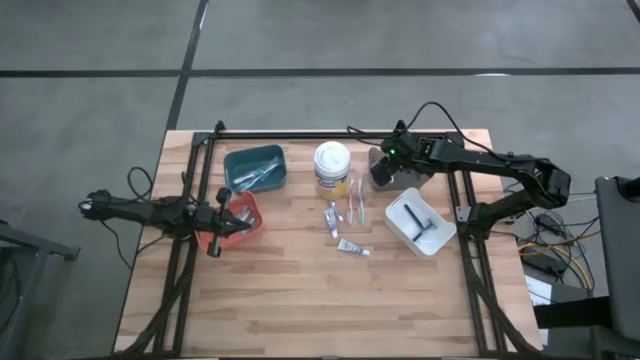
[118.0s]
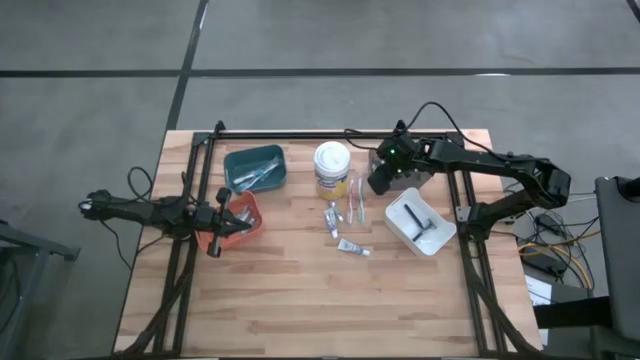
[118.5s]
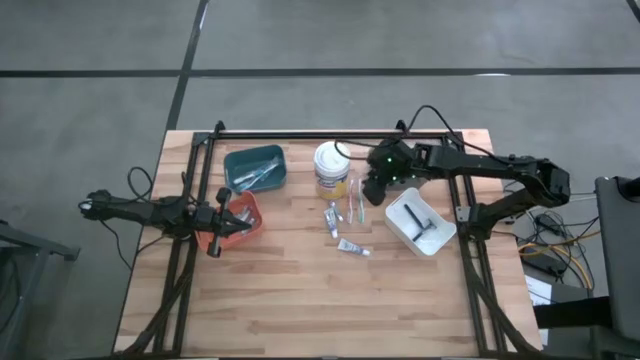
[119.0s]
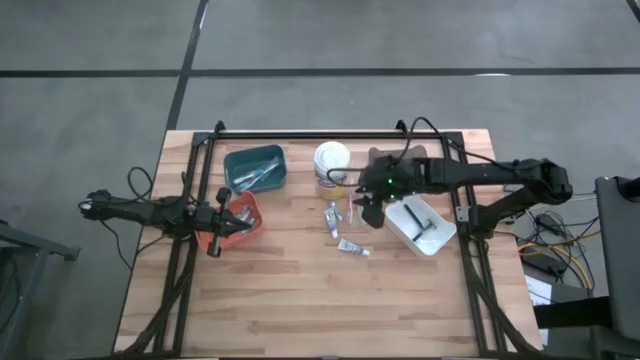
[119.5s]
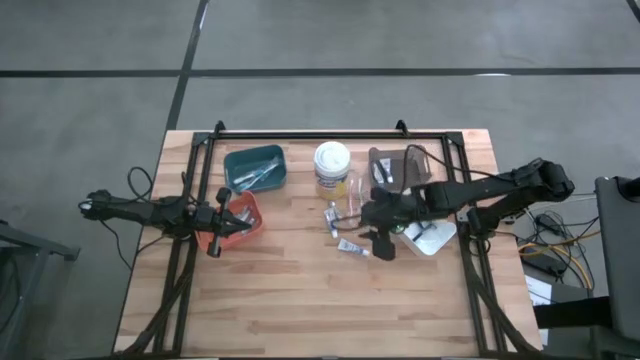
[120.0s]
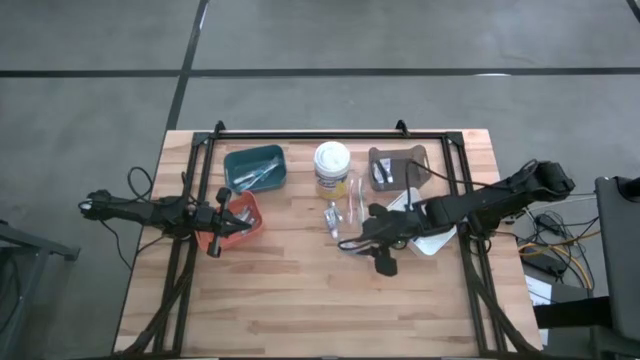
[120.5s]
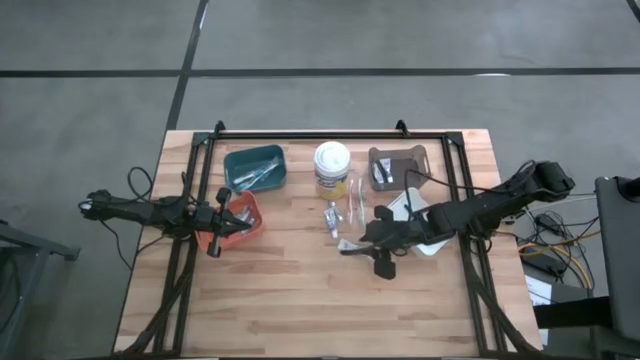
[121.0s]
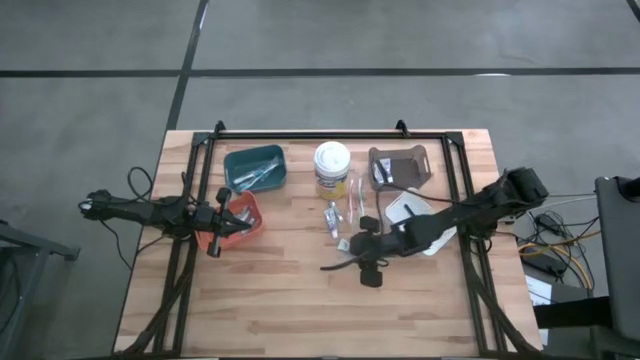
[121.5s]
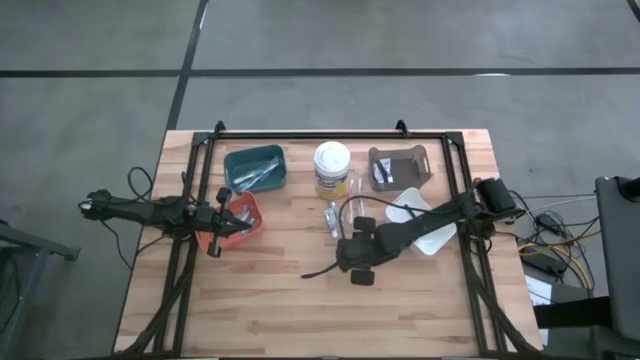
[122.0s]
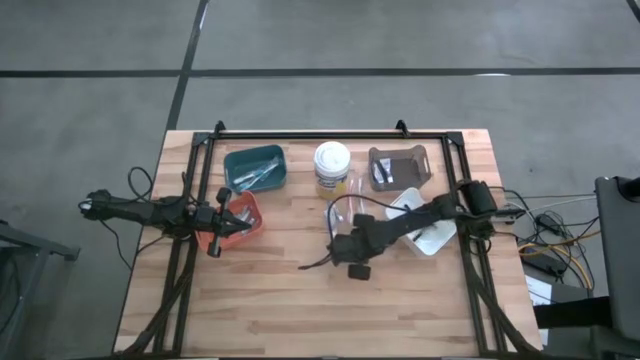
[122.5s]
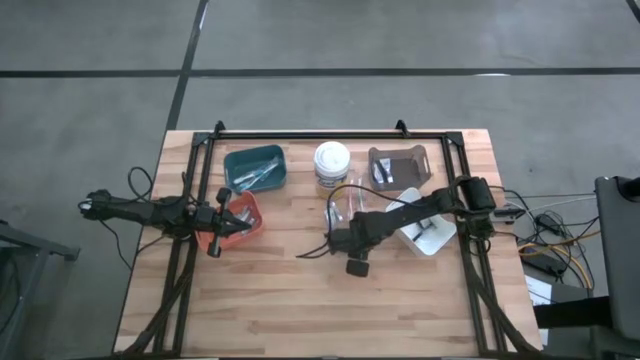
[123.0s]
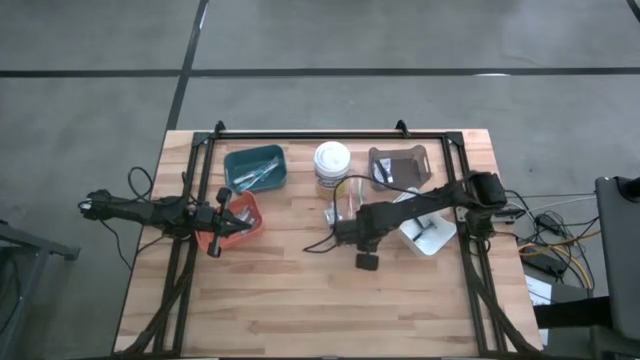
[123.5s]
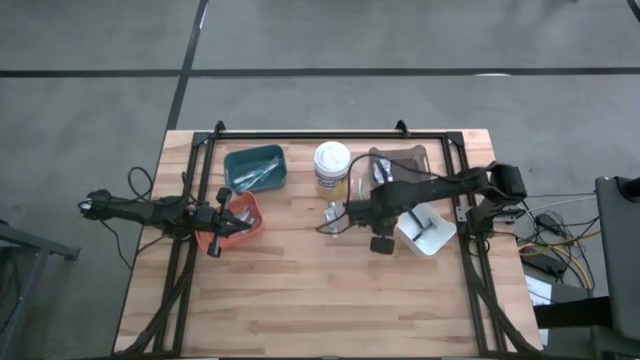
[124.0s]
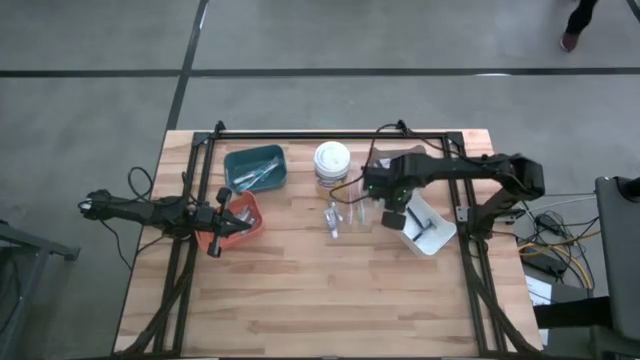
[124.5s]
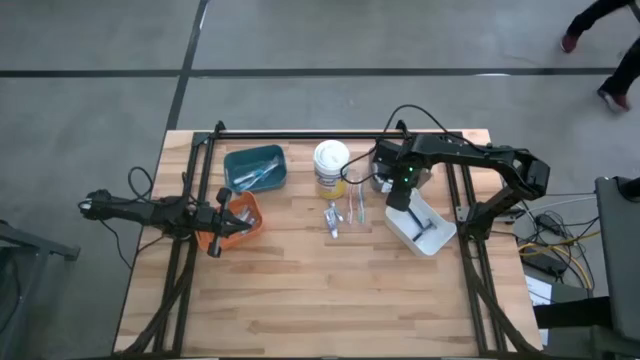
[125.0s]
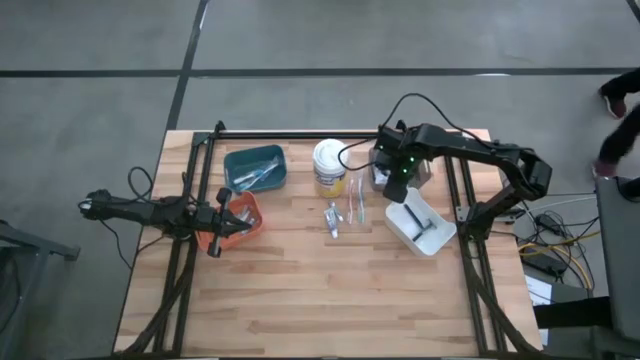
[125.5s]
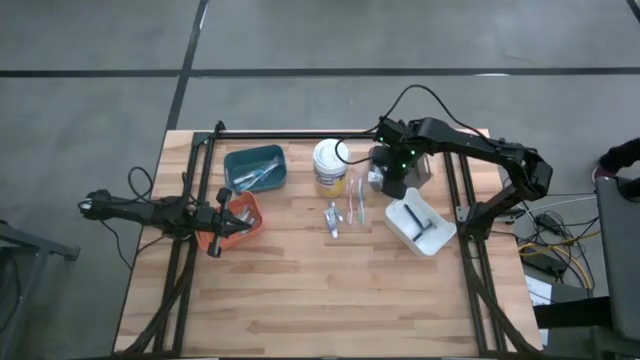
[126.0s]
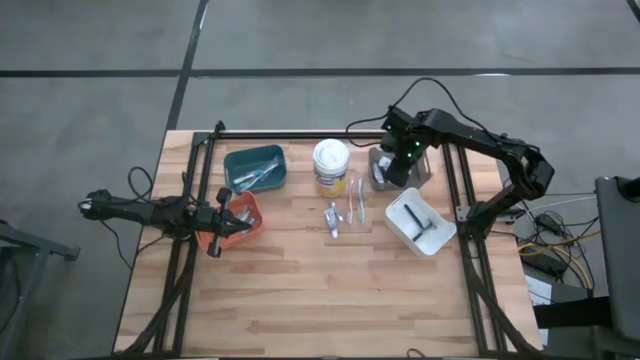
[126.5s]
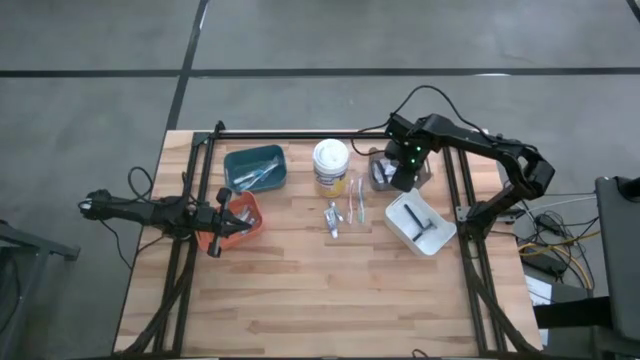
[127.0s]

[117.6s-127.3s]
Task: Pick & Place Travel size toiletries
Put the bottom toothpaste into the black bin

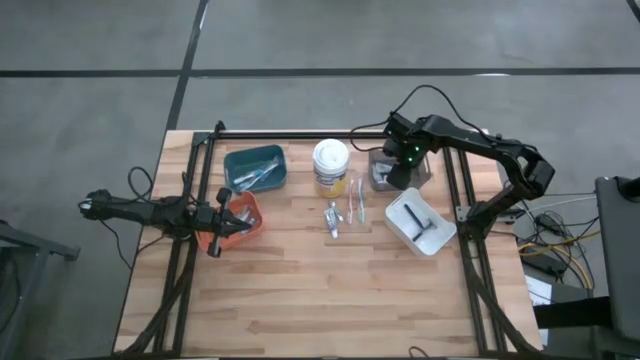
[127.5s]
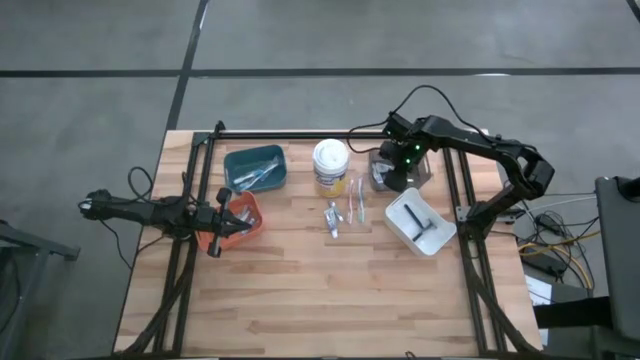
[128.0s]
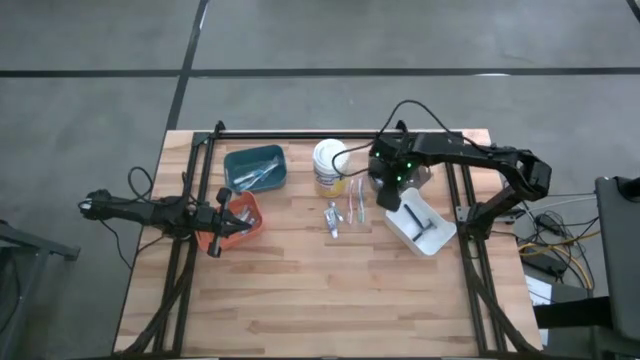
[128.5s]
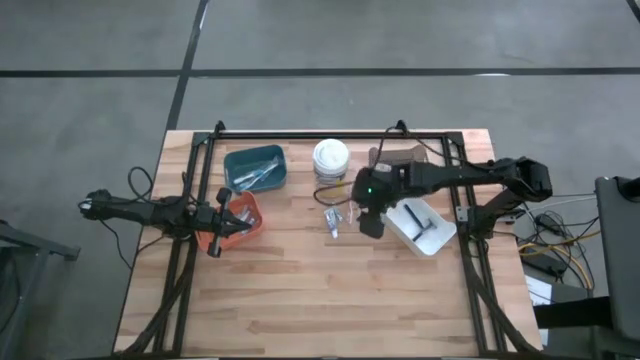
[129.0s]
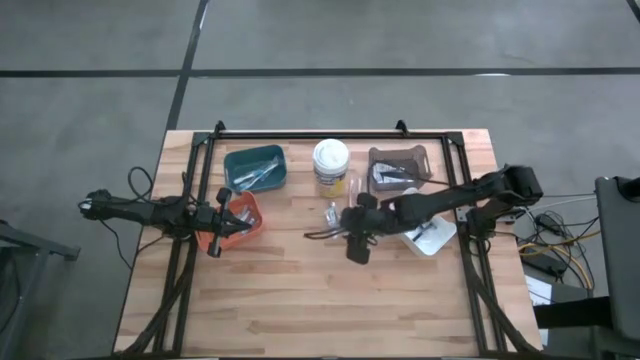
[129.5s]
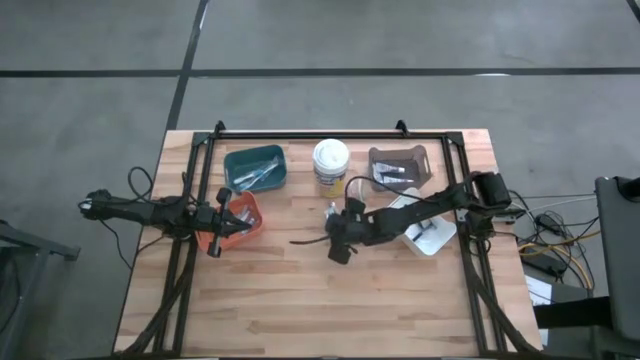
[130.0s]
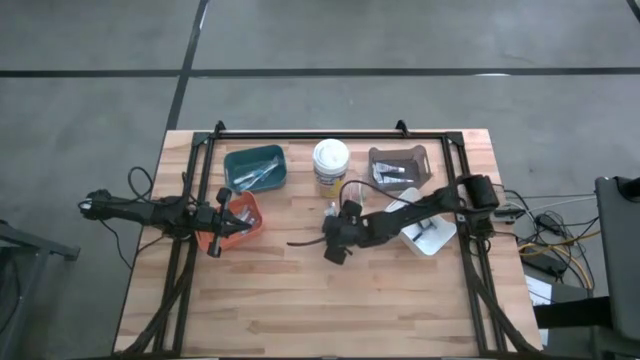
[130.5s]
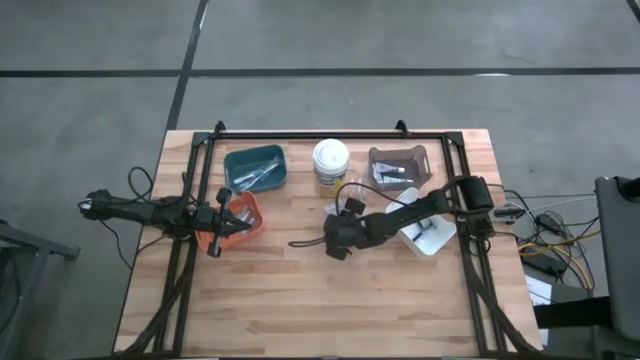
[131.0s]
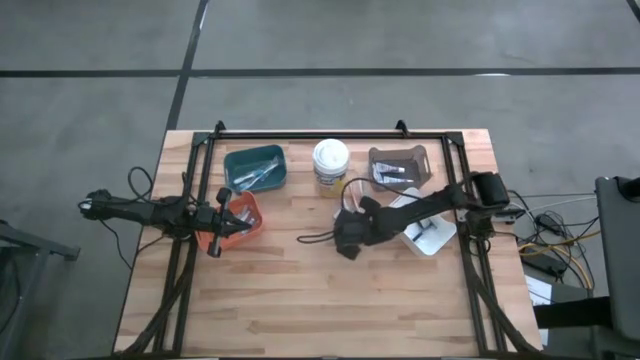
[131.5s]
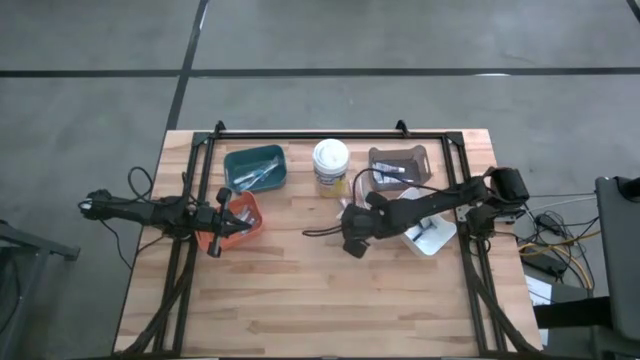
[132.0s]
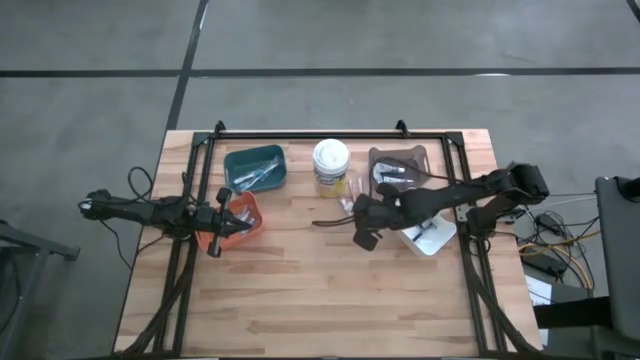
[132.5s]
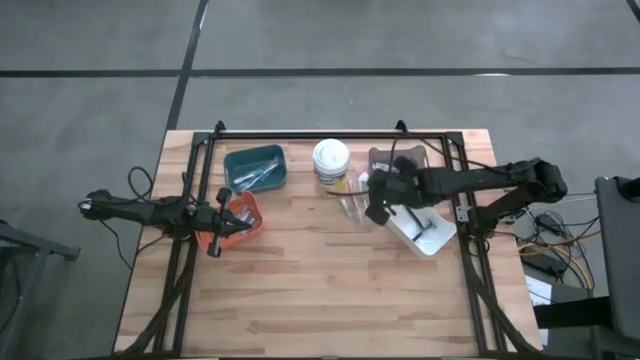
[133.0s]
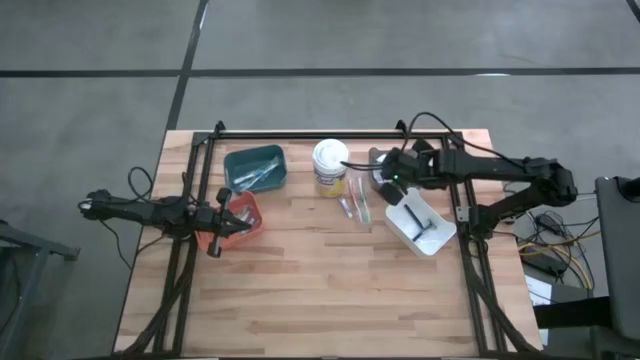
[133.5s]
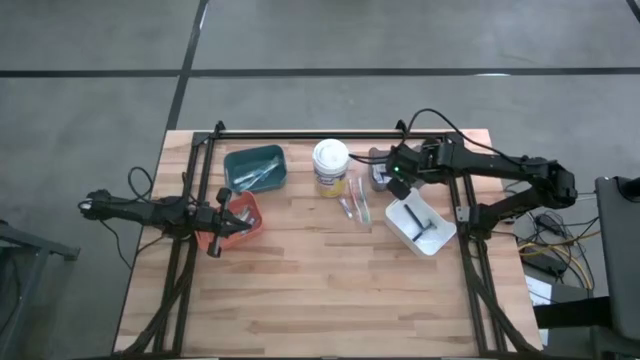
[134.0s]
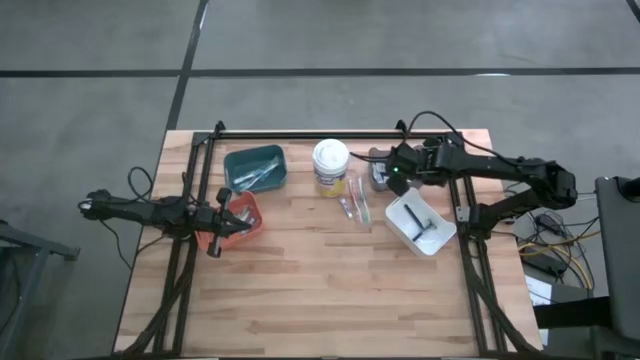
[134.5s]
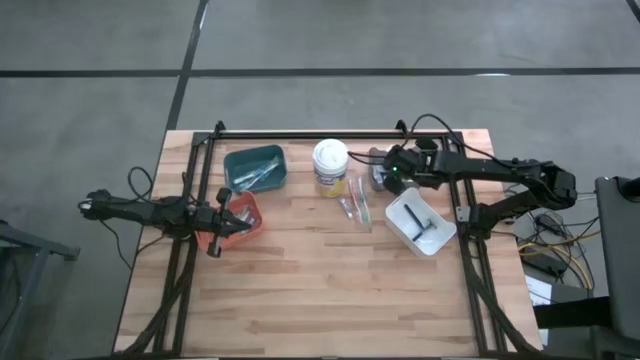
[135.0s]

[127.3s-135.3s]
Put the toothpaste into the black bin

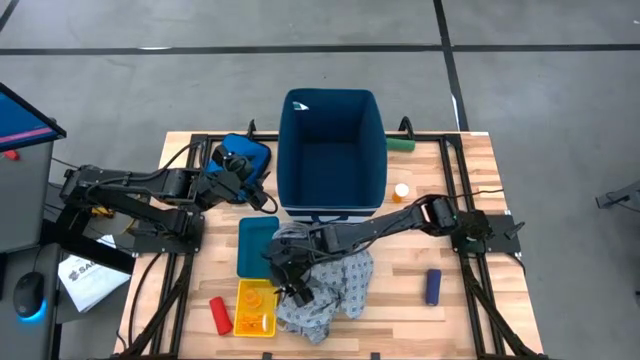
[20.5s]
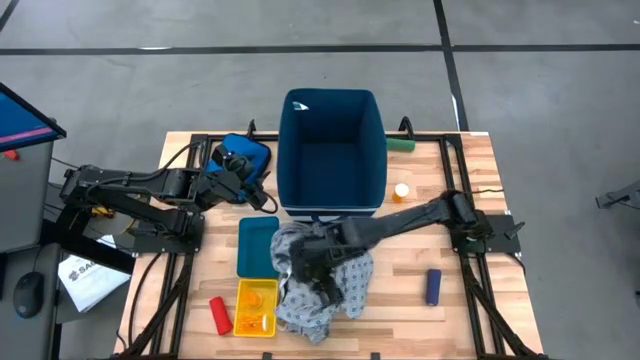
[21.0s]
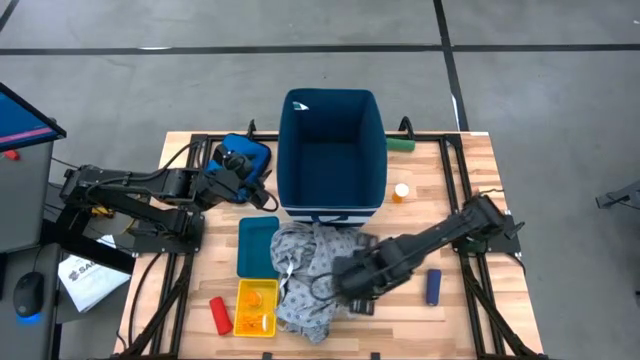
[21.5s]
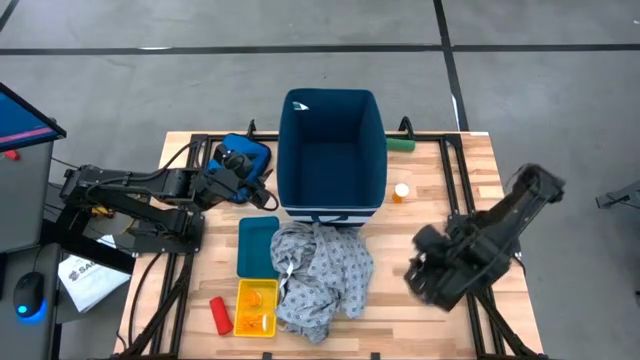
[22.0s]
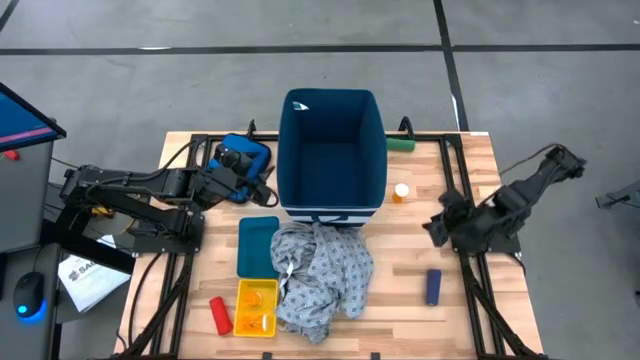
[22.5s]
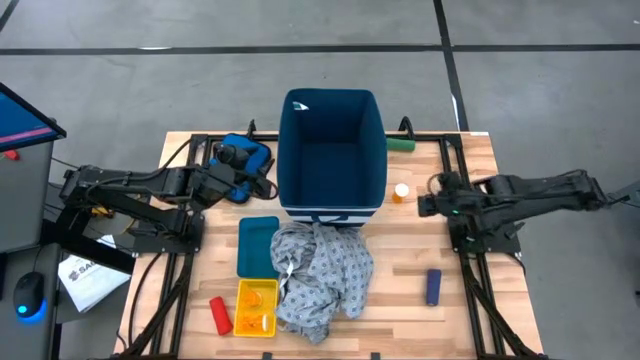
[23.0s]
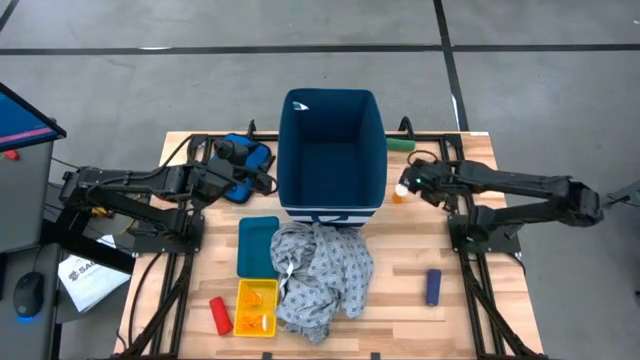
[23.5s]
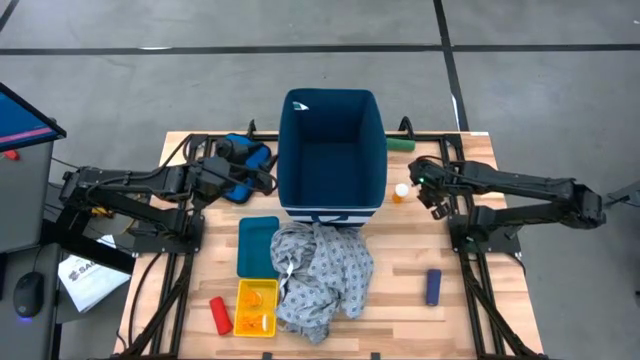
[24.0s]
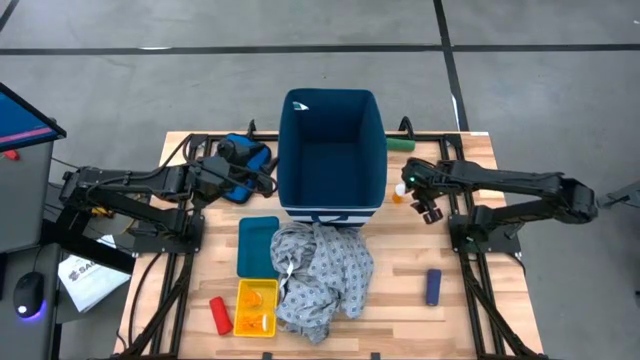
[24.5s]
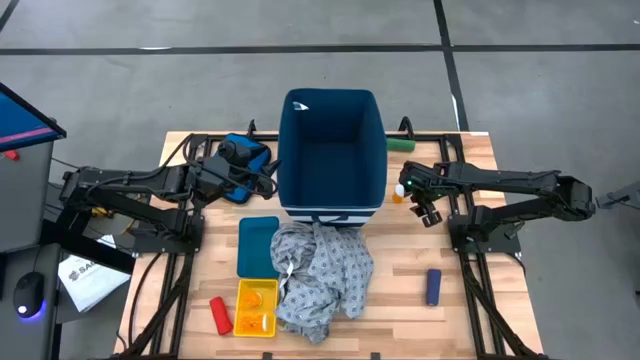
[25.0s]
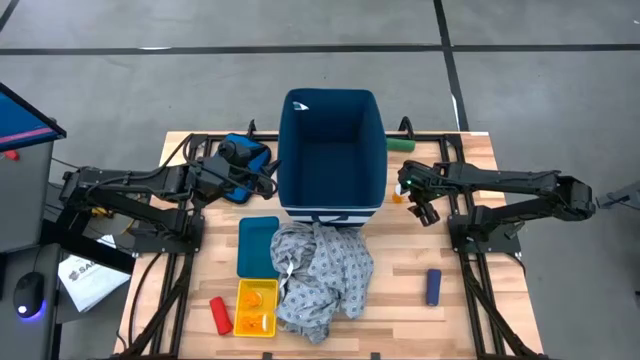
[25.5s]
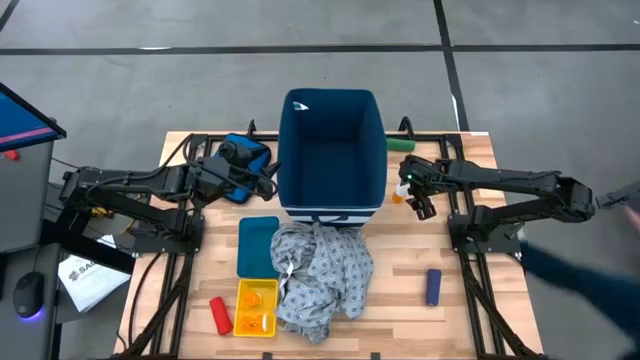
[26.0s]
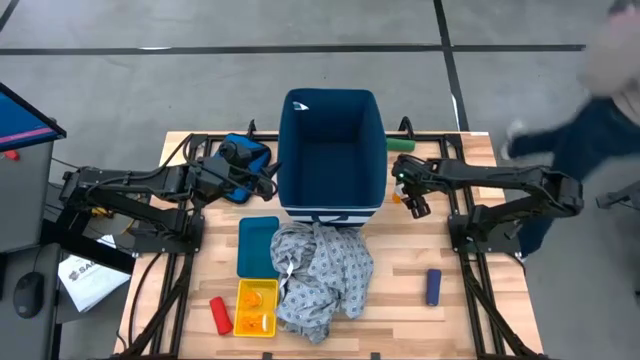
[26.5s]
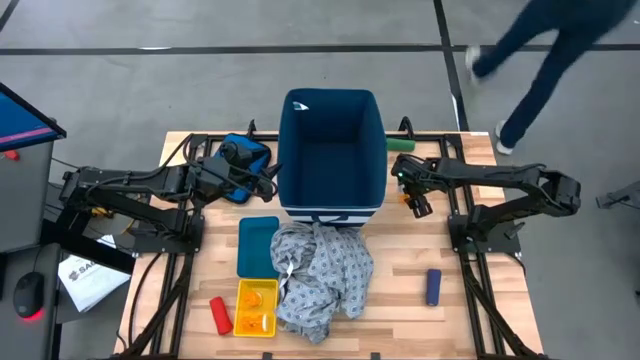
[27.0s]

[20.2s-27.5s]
Task: Pick & place medical supplies in basket/bin
Put the orange pill bottle into the yellow bin
